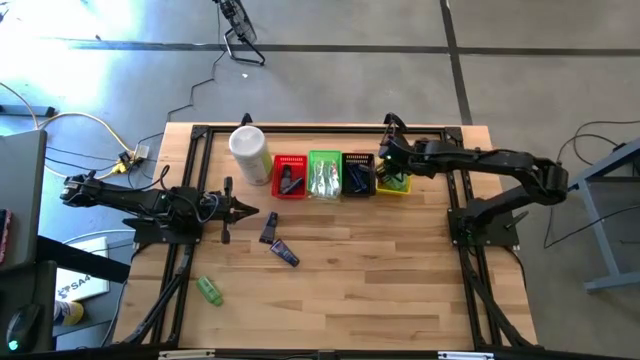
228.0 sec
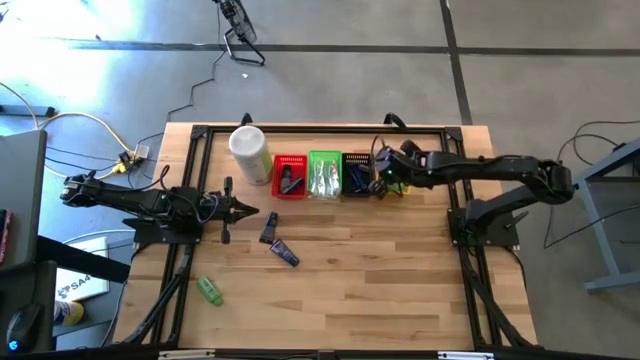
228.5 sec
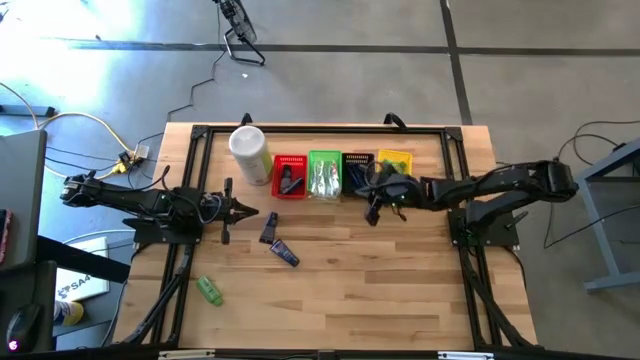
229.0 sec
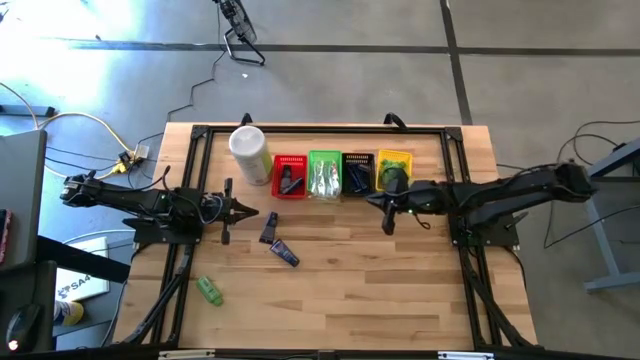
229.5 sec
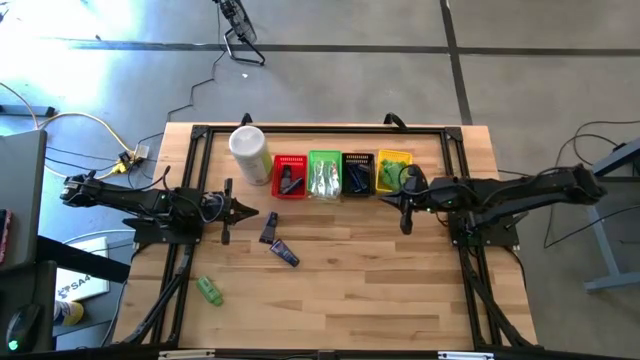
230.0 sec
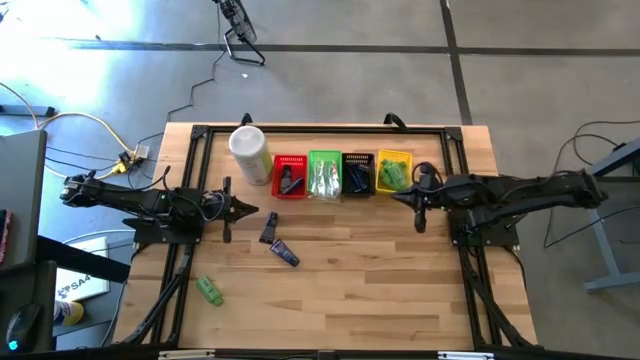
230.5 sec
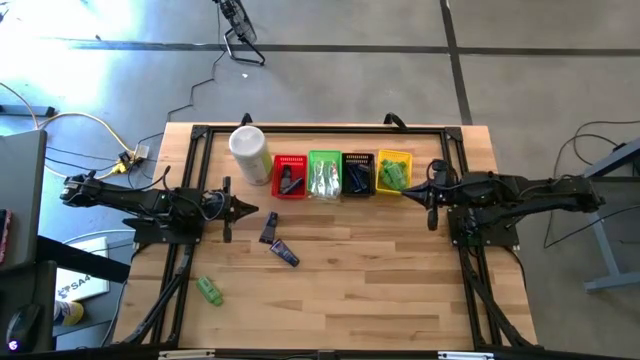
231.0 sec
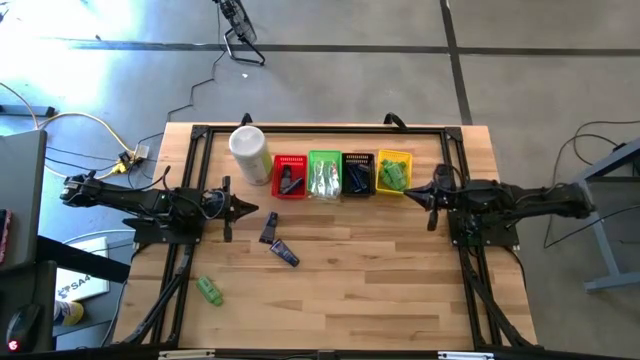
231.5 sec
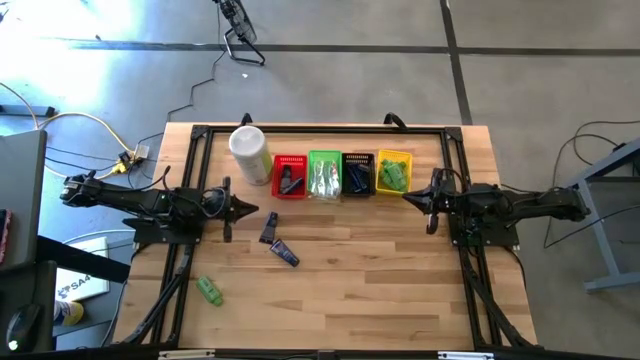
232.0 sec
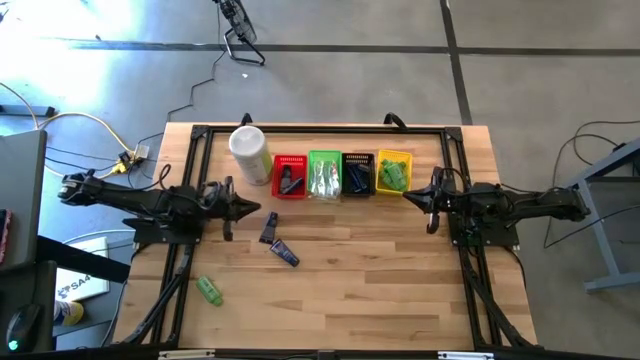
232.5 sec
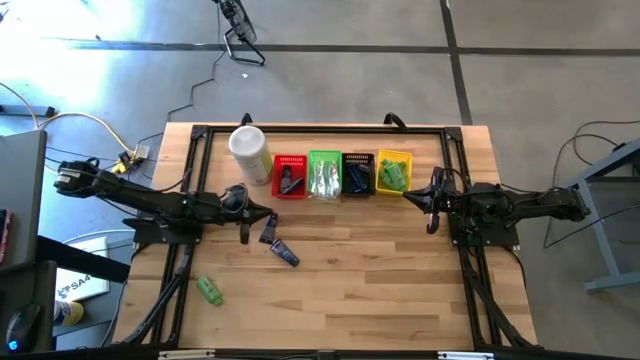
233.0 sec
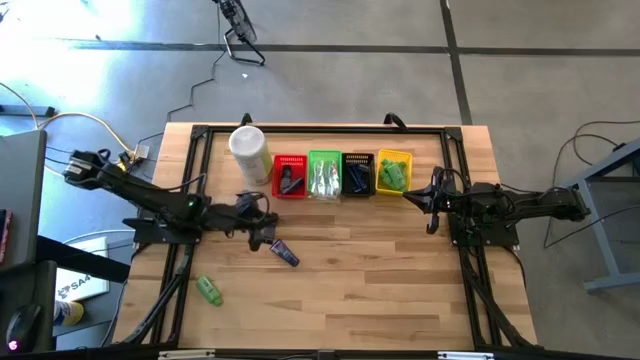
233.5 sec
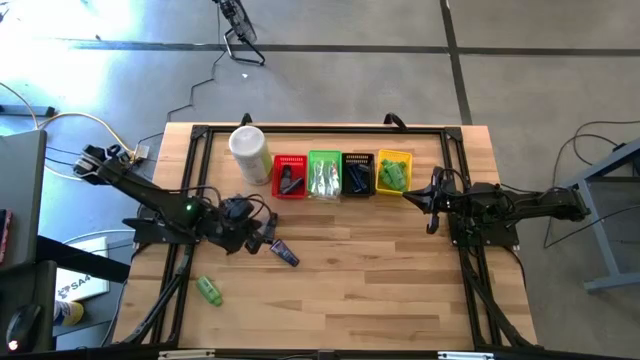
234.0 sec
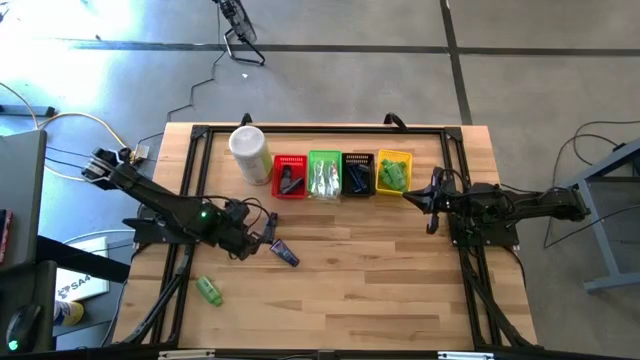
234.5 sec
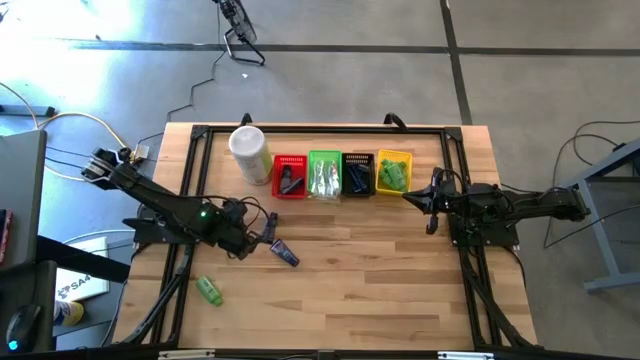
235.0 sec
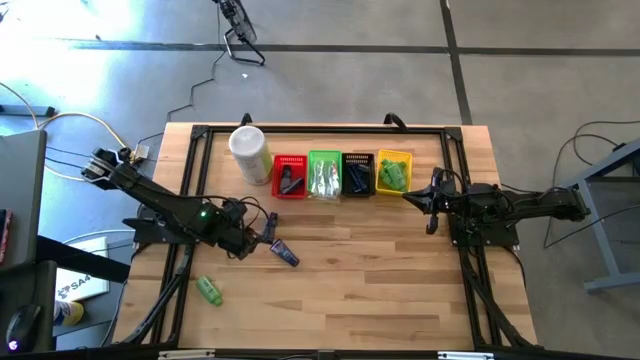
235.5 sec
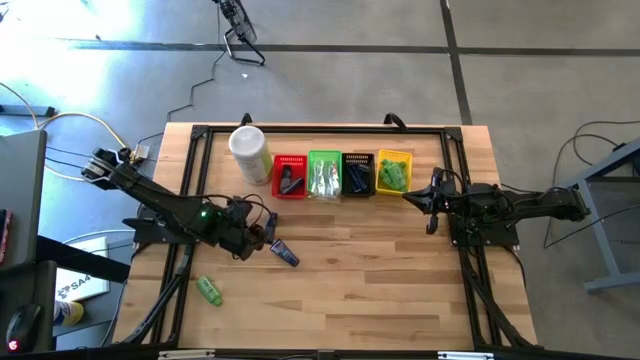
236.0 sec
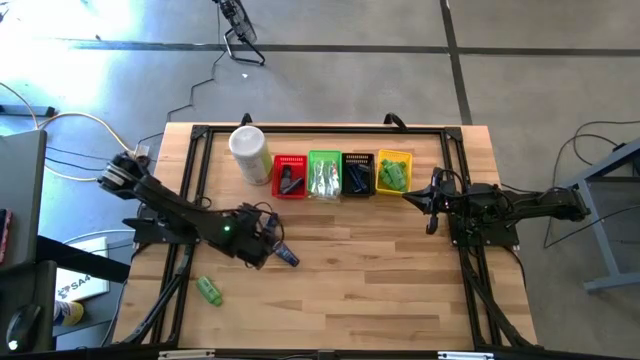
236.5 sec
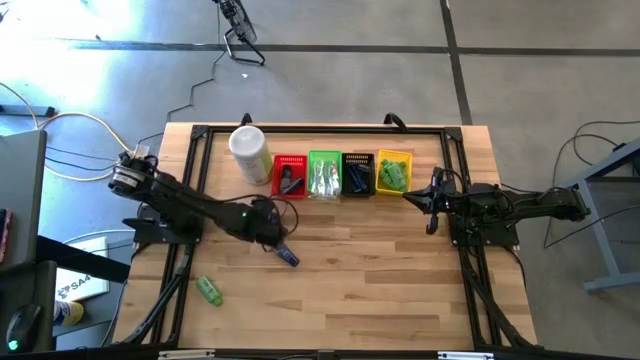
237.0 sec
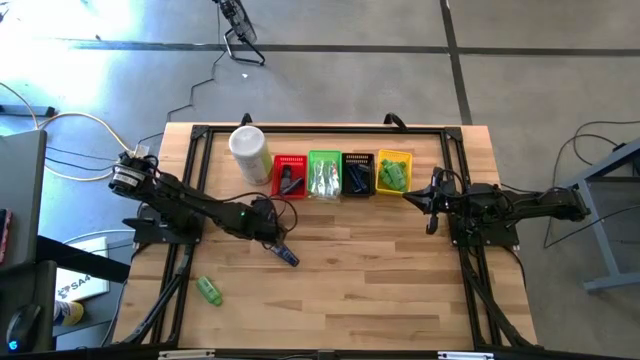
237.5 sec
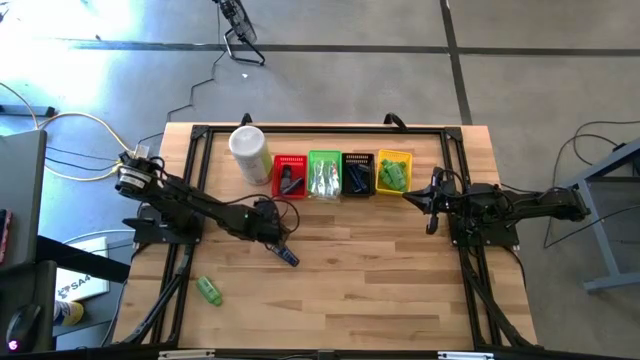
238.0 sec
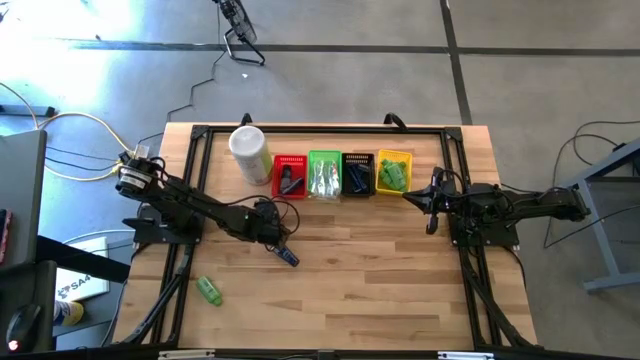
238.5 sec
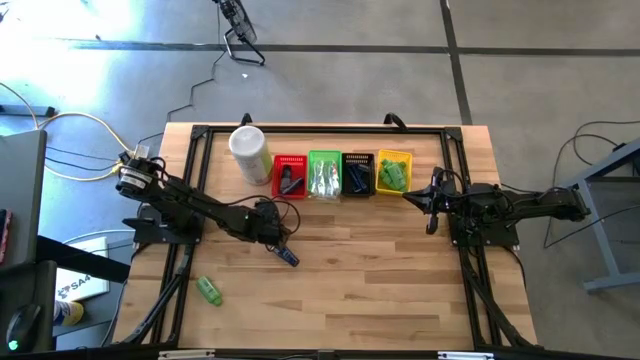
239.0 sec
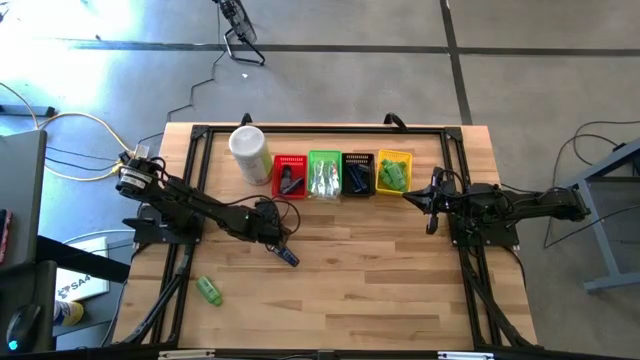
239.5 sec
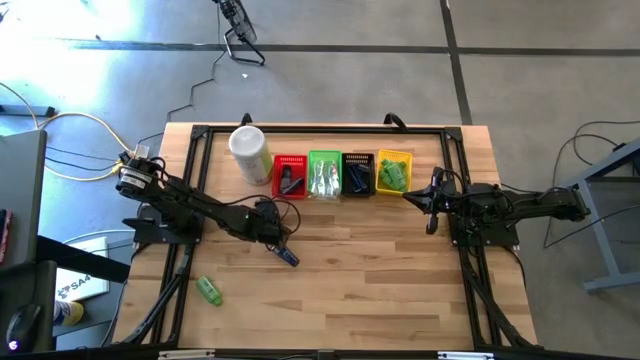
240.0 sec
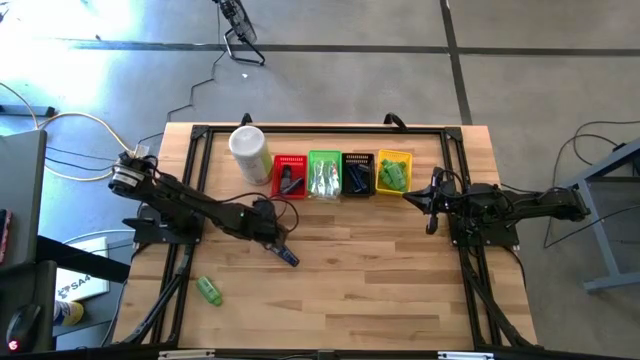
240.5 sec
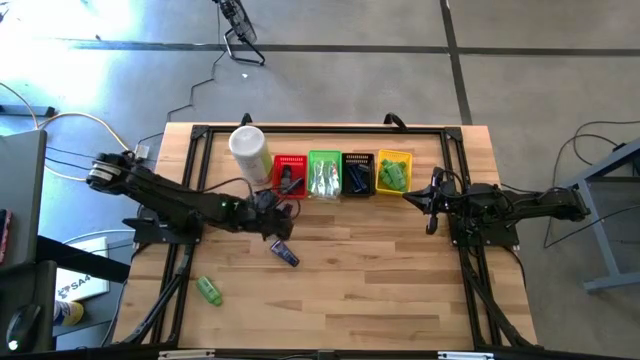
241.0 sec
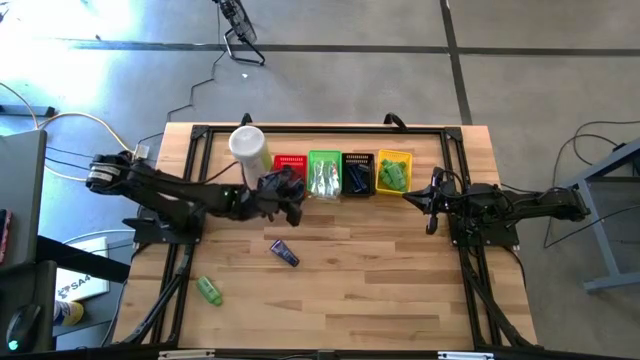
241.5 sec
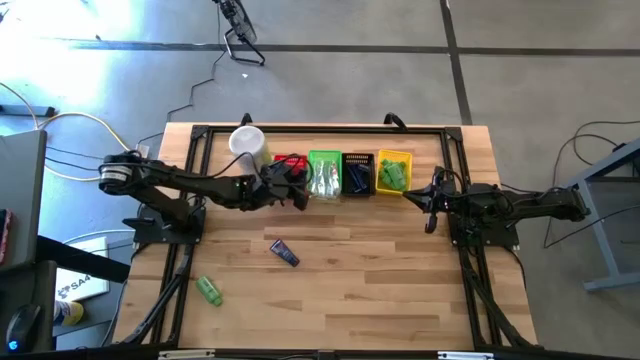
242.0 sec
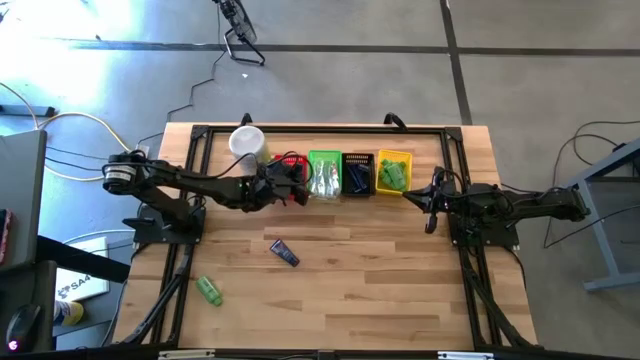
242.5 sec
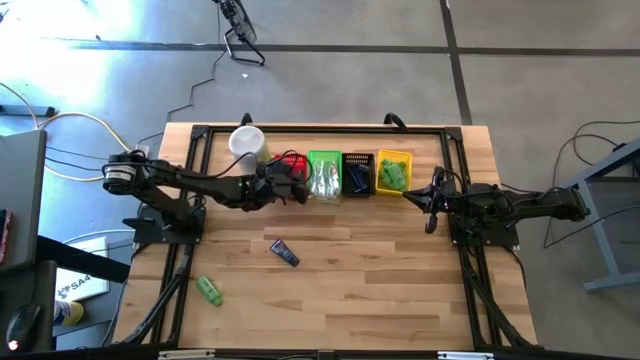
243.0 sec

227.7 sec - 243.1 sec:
Task: Pick & Place Travel size toiletries
Put the blue shave cream into the red bin

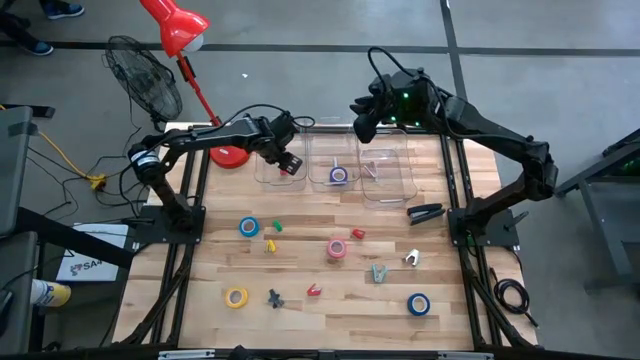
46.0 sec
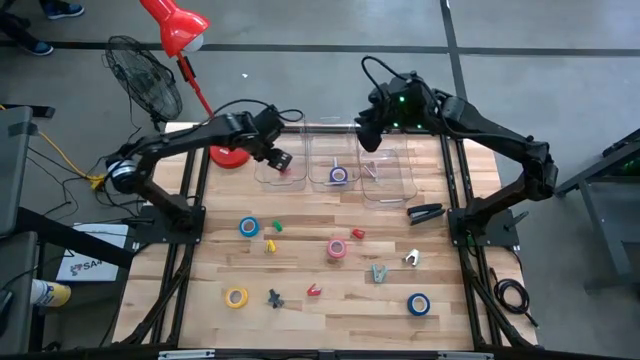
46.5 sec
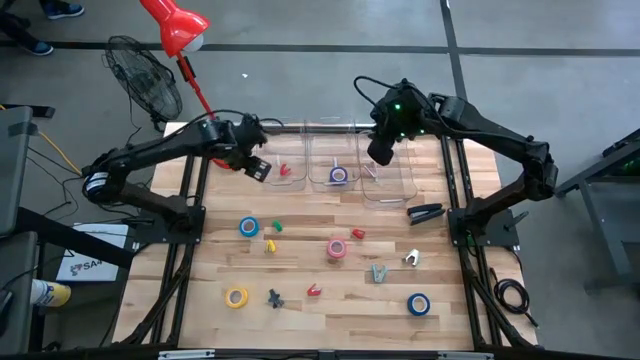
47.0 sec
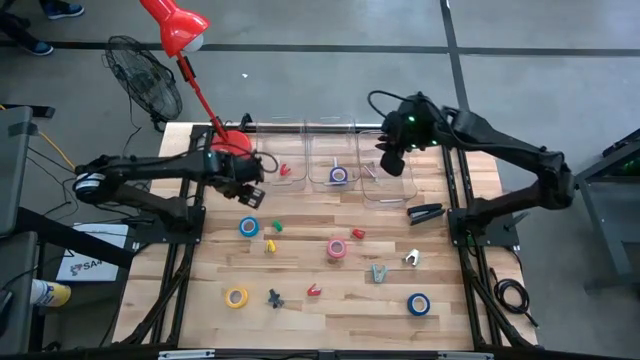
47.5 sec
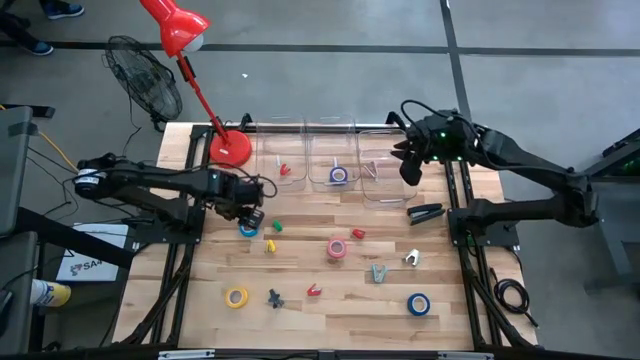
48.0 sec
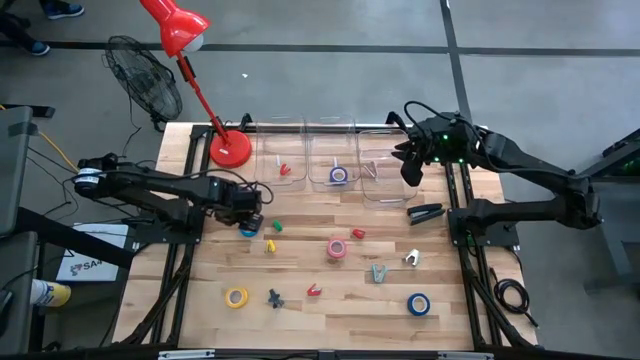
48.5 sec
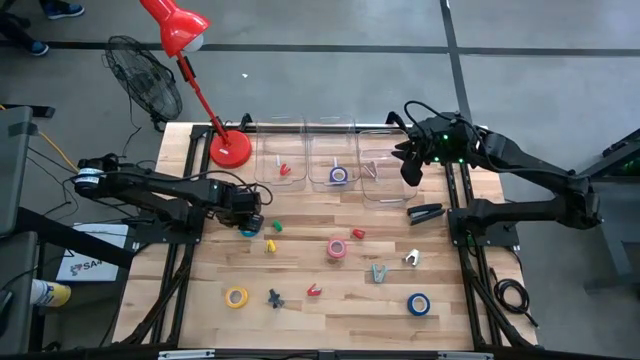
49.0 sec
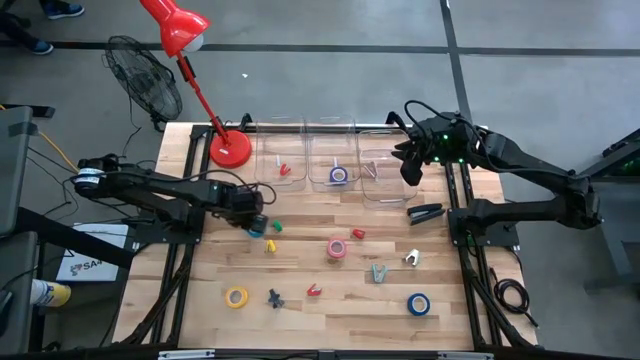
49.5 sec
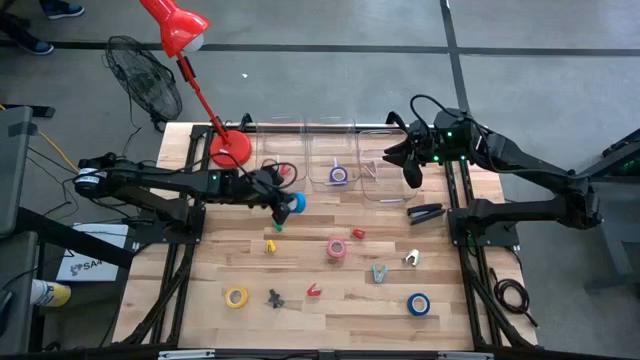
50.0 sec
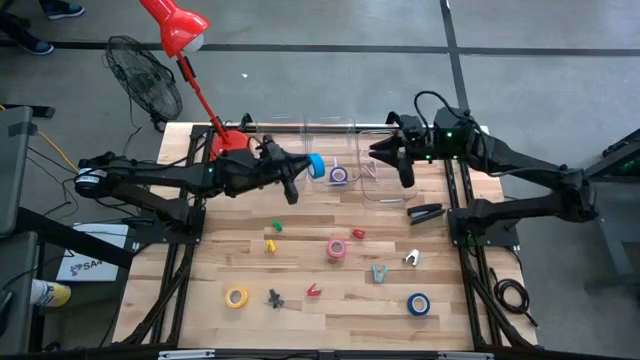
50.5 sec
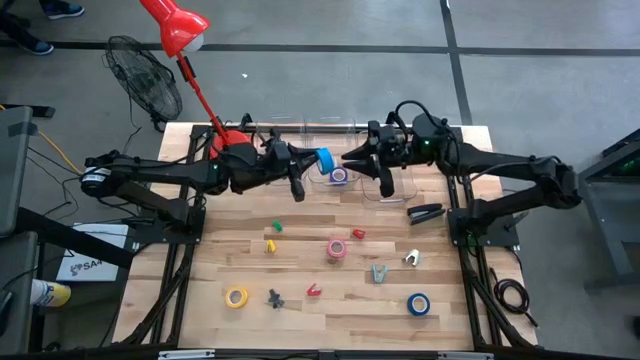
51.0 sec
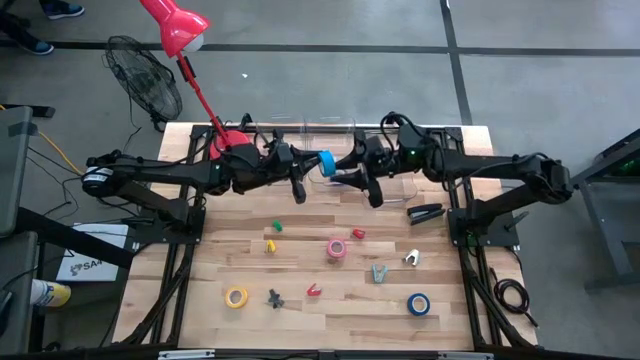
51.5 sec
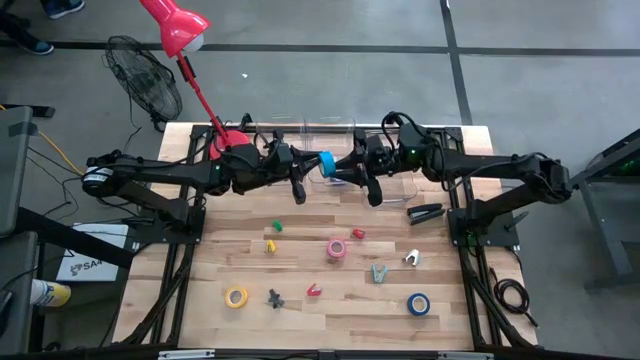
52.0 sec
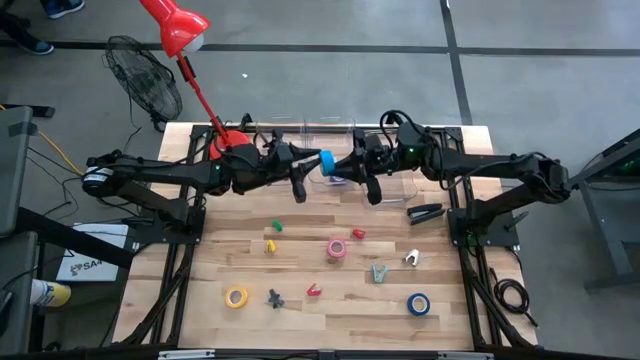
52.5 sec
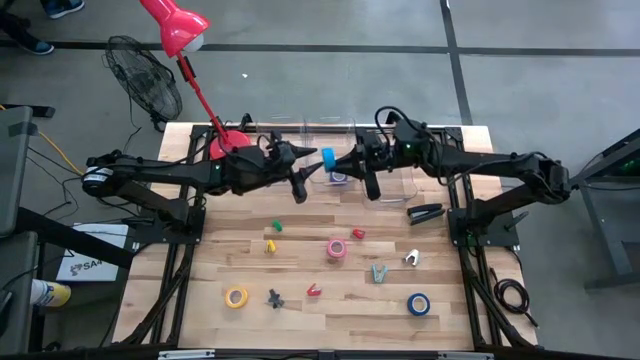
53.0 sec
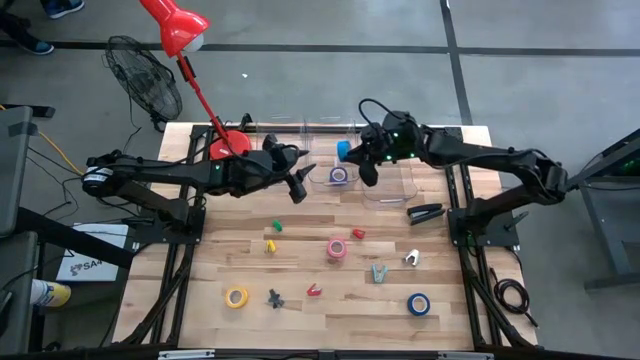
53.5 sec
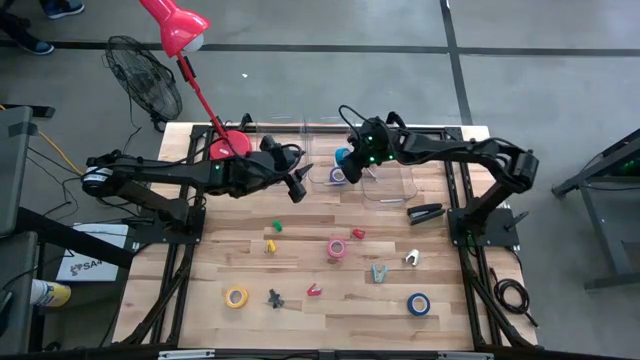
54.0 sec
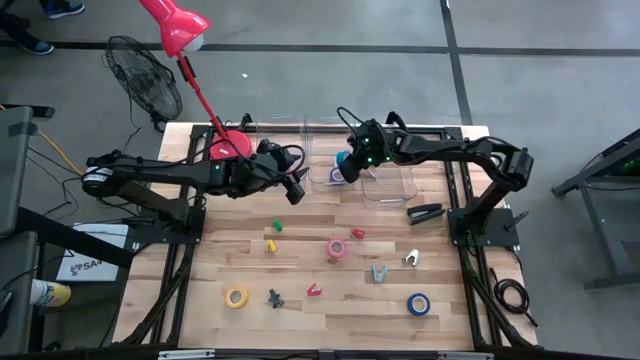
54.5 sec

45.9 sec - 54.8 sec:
Task: Pick and place Stapler, Stapler remover, tape
Put the light blue tape into the middle transparent bin
